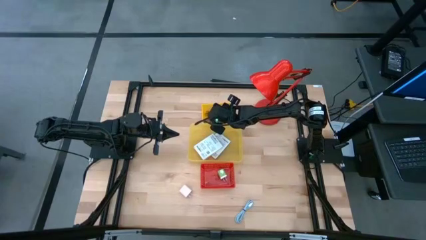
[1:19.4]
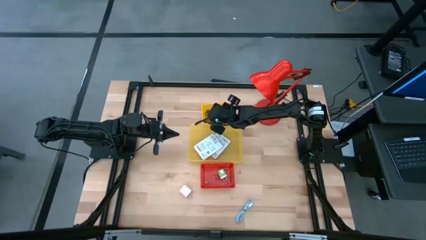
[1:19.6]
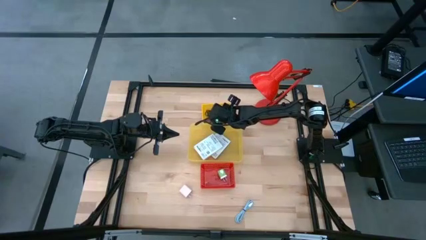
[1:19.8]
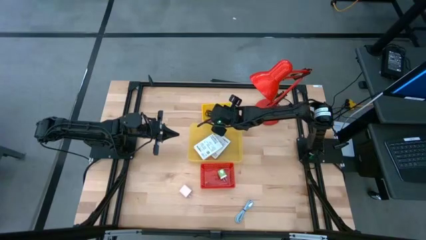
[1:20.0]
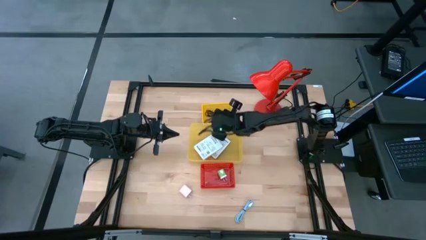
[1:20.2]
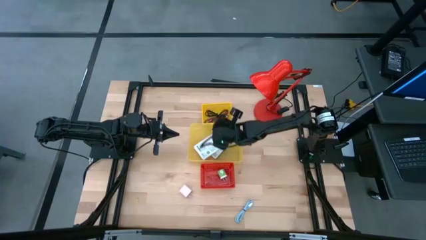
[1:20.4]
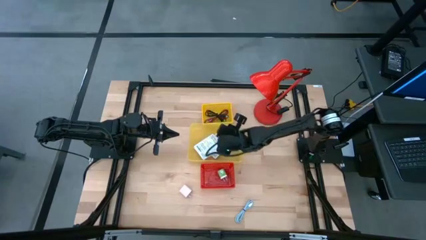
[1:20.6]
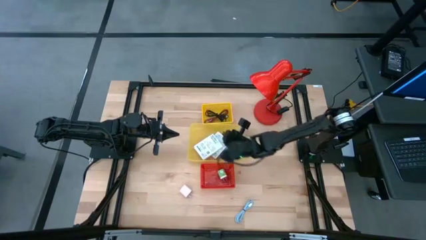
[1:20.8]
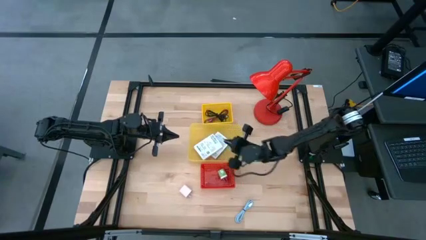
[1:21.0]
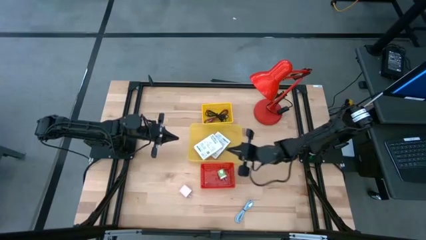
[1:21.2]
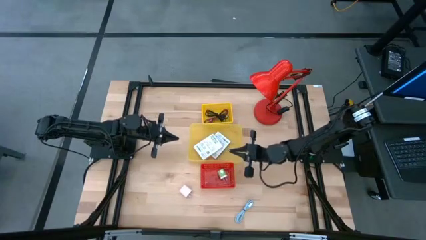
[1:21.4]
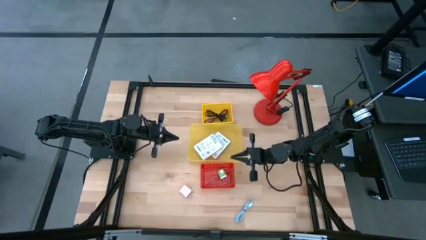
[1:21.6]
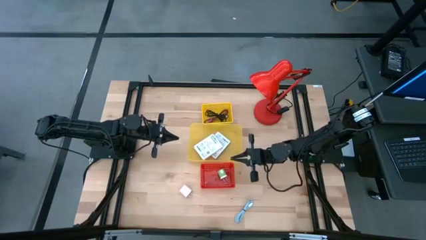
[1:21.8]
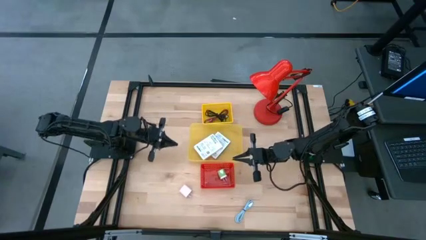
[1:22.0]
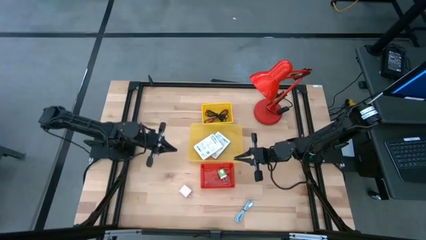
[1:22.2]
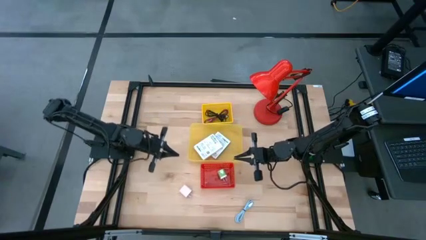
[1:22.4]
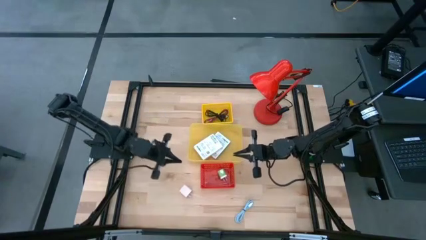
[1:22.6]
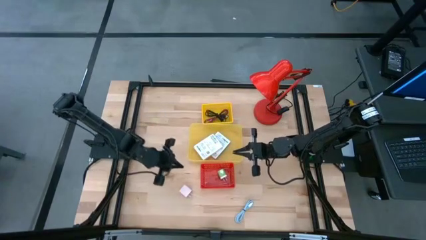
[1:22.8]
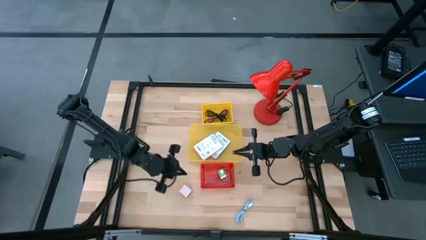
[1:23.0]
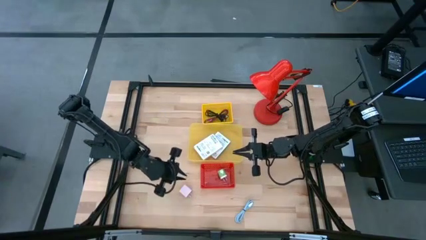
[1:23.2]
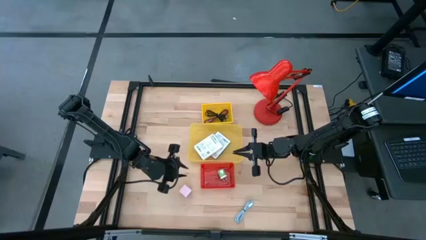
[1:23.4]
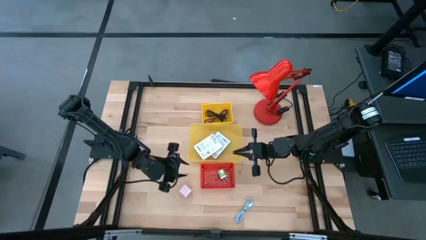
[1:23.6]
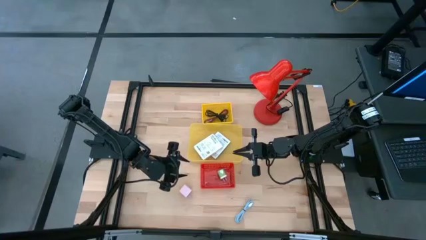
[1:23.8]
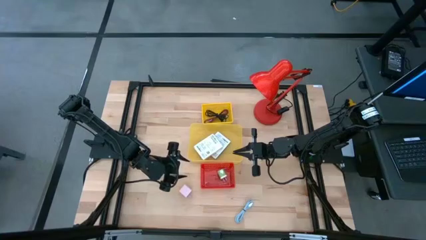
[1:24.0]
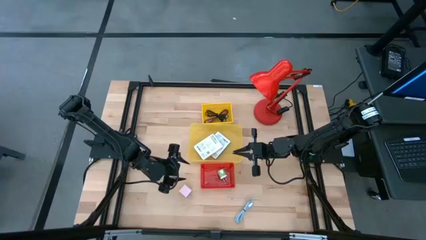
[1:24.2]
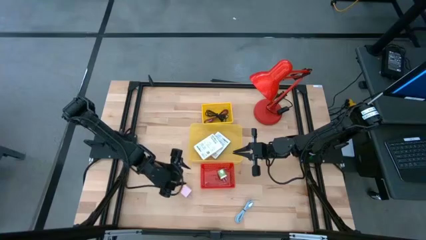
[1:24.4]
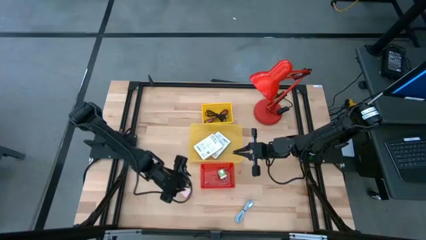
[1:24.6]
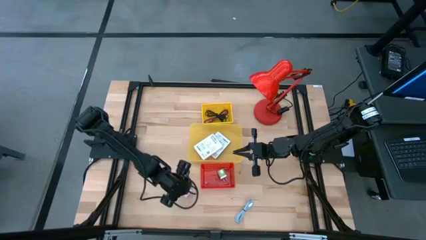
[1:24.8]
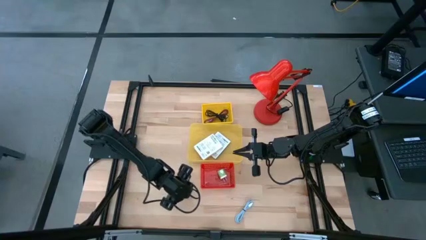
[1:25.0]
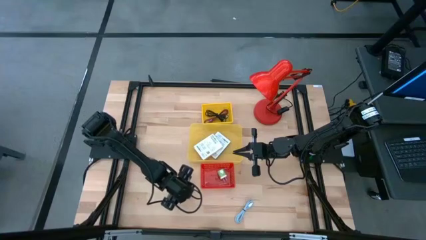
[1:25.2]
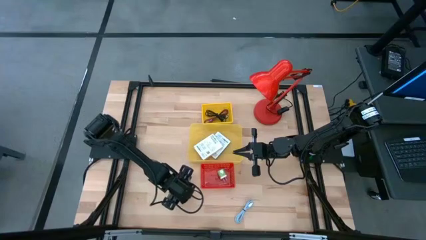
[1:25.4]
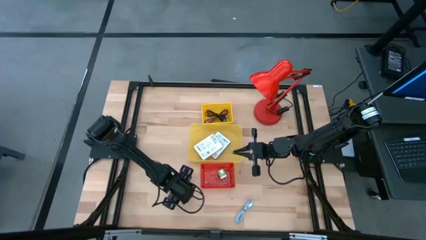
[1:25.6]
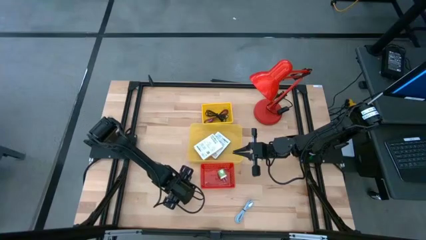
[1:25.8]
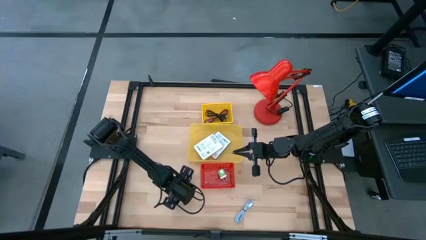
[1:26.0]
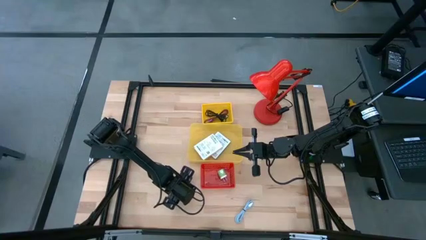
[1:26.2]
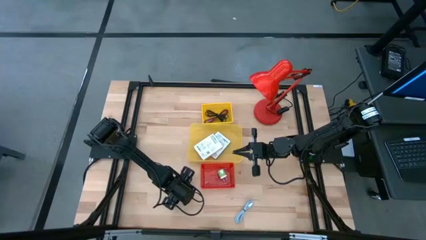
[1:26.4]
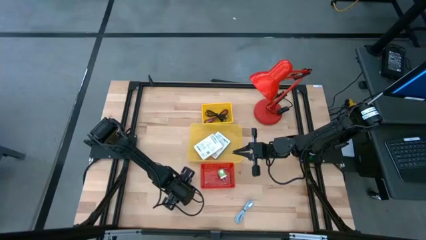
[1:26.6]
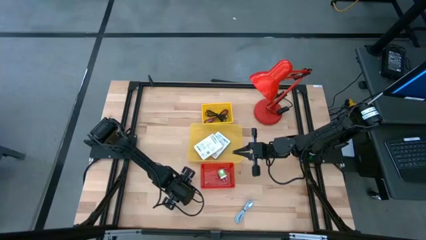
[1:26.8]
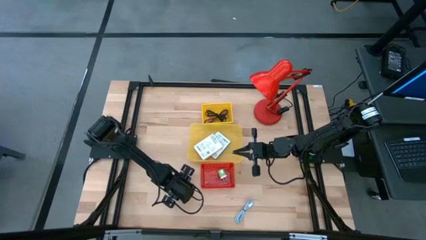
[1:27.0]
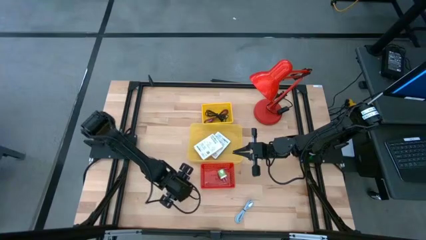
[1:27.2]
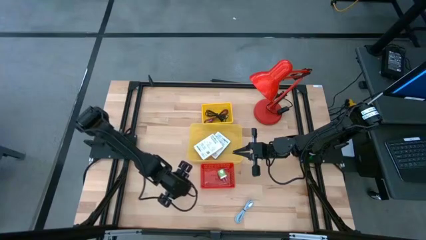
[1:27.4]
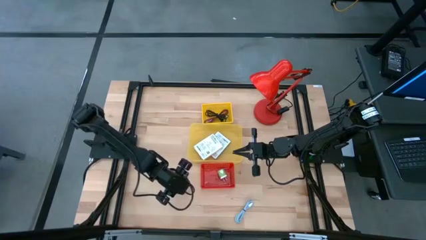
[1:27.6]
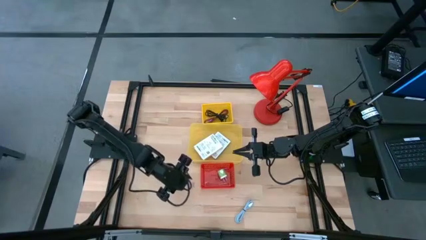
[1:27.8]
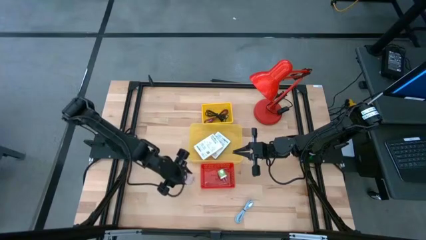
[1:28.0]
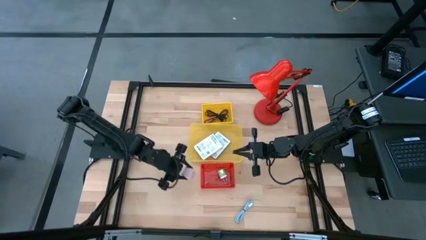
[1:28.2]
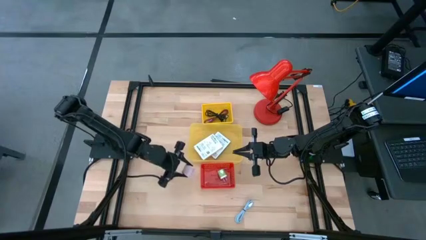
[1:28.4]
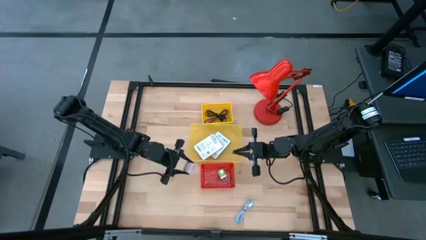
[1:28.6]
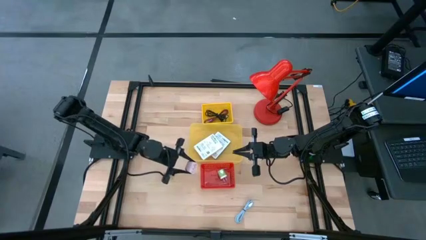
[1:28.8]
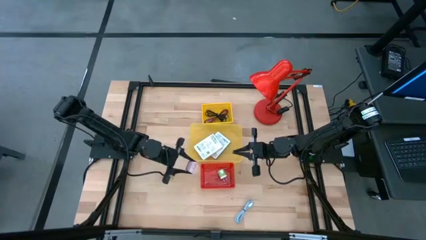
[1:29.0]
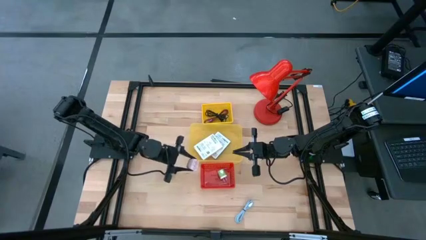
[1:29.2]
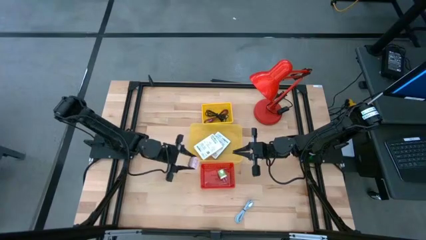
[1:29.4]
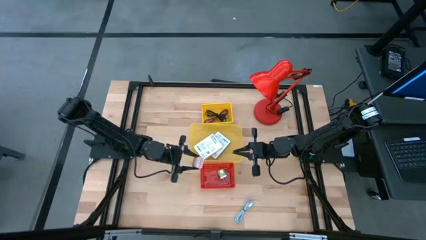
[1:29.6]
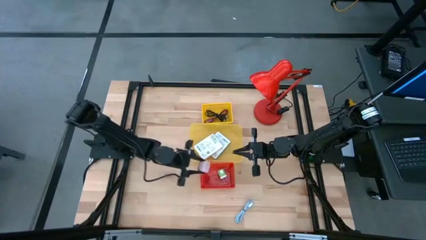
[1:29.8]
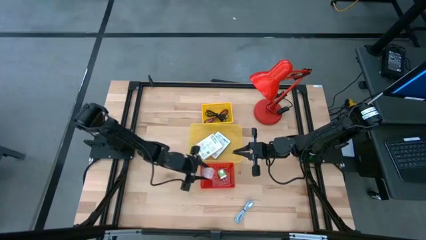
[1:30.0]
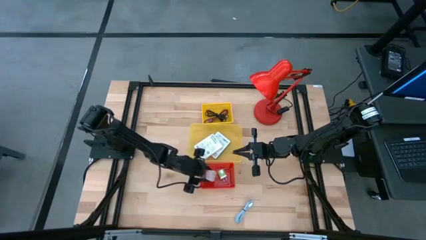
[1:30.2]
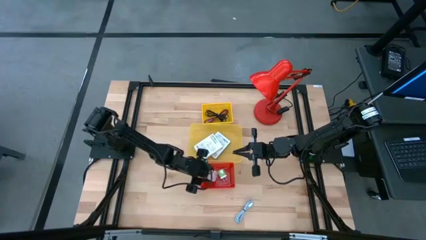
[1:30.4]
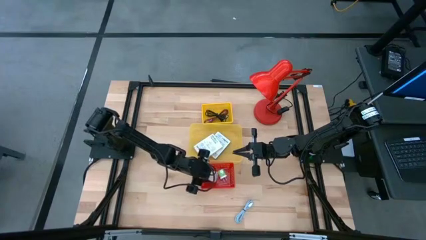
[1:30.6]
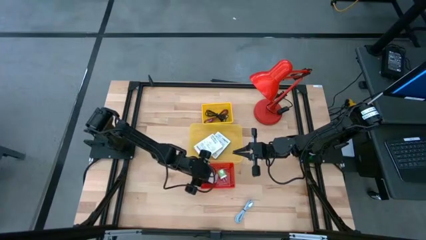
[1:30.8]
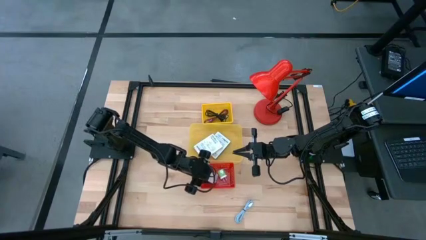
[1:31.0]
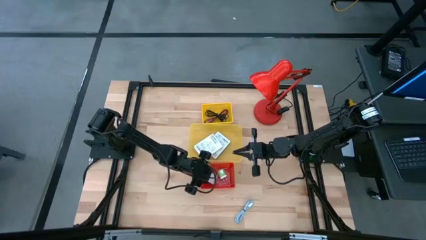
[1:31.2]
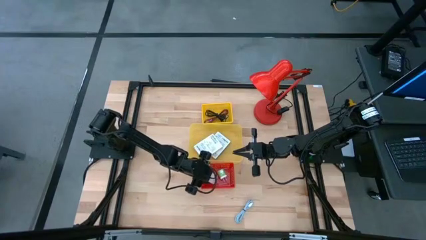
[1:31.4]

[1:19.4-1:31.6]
Task: Pick and place items into bin
Put the light pink charger adapter into the red bin

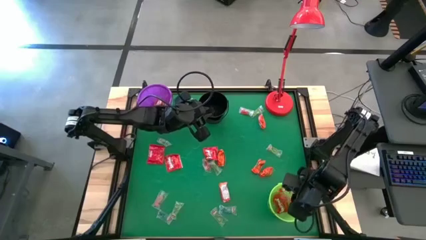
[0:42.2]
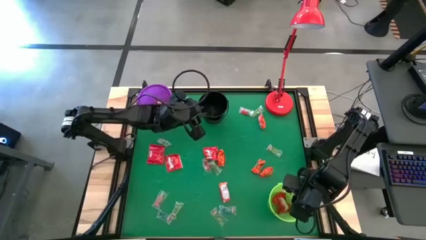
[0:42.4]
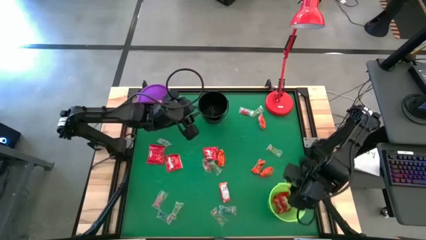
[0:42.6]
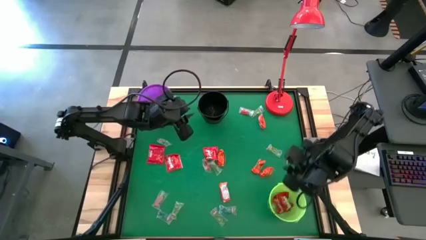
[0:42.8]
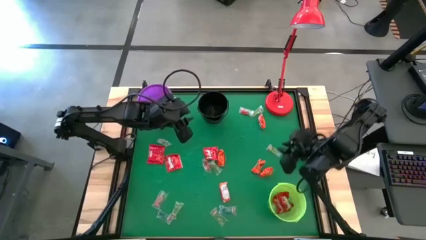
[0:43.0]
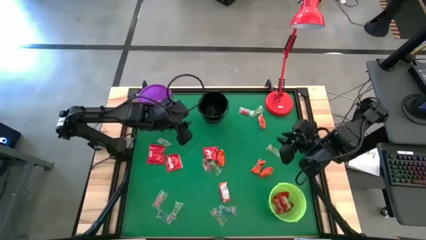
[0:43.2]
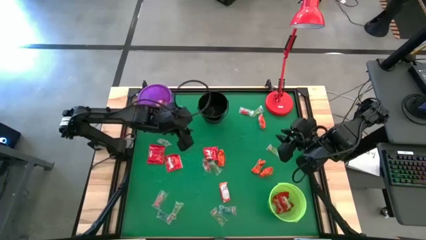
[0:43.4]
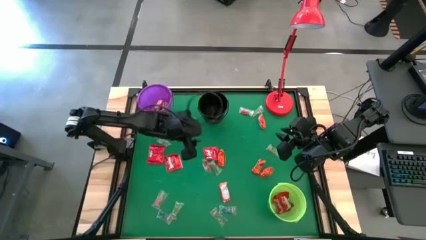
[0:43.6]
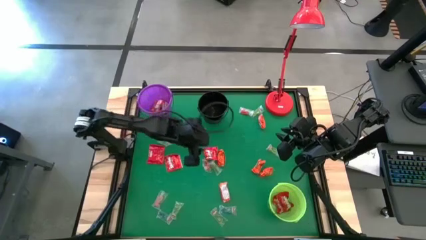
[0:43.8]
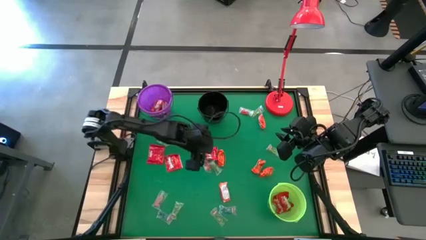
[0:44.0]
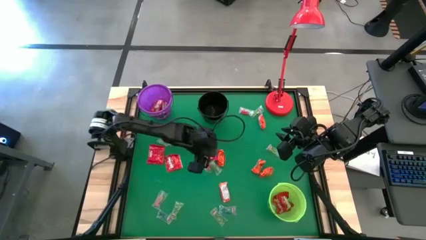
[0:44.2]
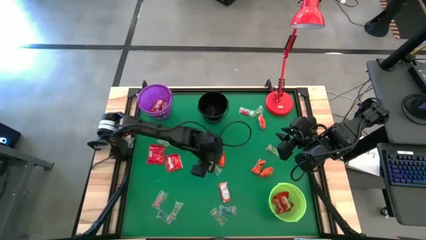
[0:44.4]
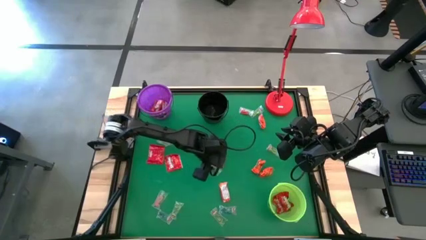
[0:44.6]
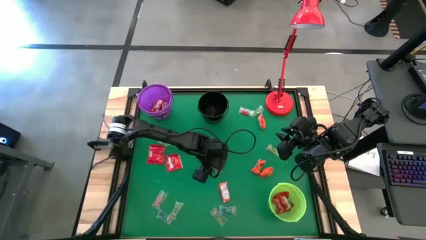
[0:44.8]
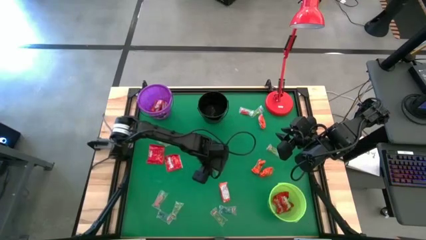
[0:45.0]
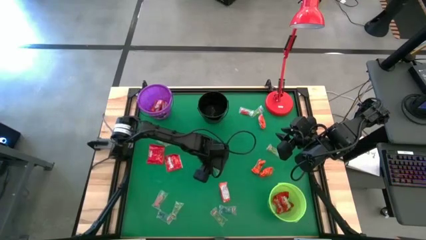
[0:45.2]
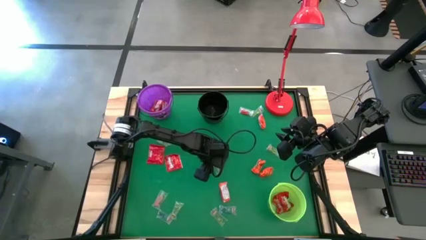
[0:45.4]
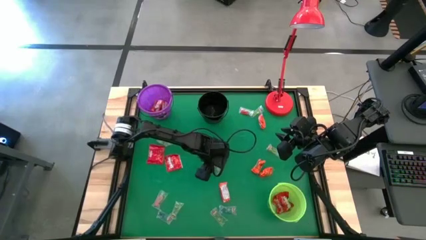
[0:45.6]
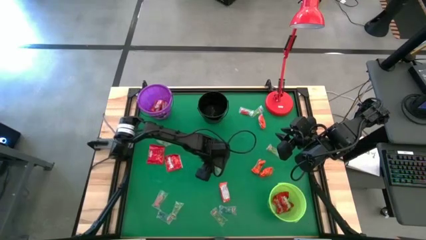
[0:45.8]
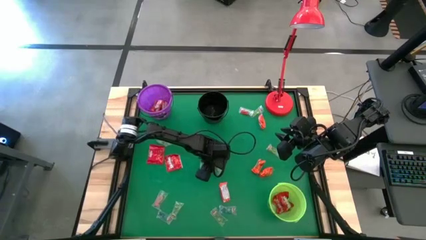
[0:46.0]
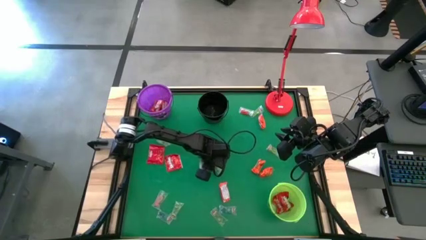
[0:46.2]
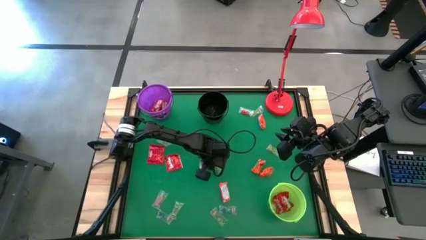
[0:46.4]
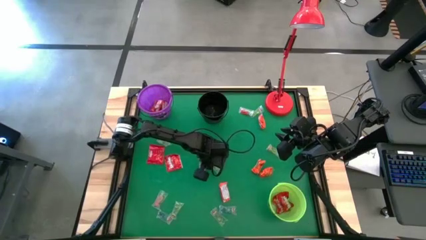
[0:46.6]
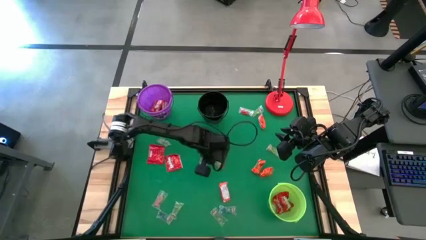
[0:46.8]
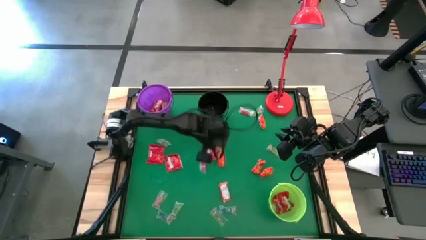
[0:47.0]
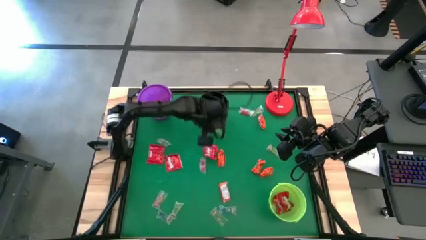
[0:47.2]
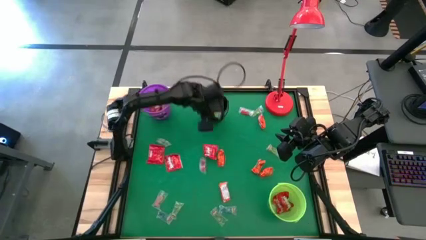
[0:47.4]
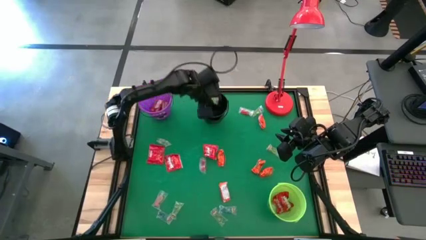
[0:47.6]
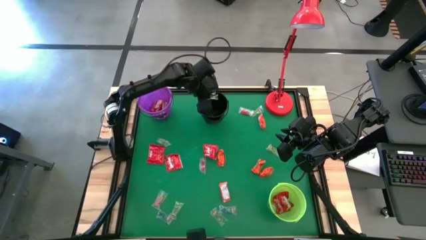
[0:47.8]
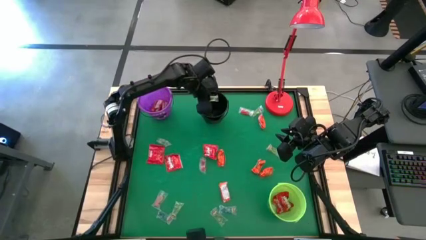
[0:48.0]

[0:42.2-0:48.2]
Task: Sort candy
Put the green gummy into the black bucket
